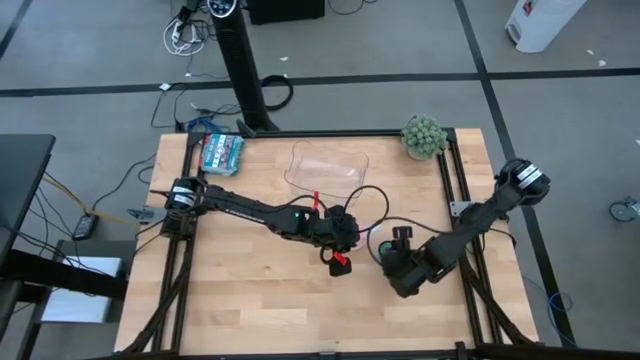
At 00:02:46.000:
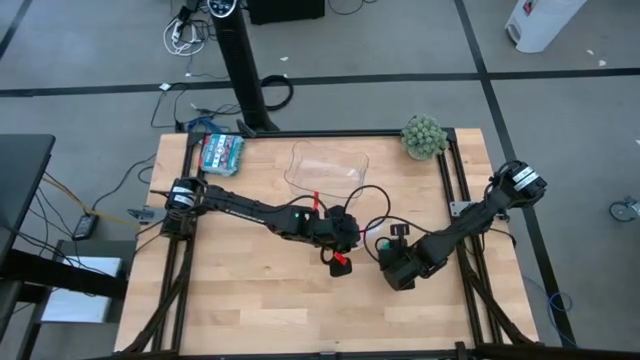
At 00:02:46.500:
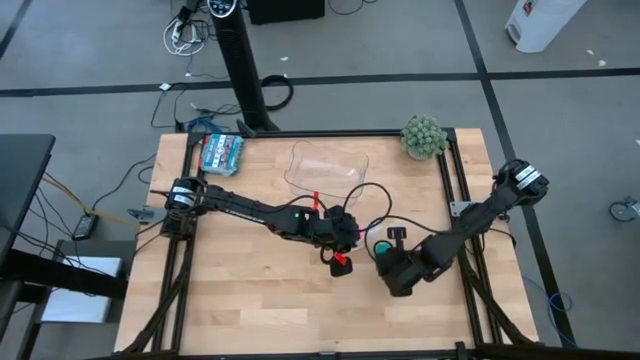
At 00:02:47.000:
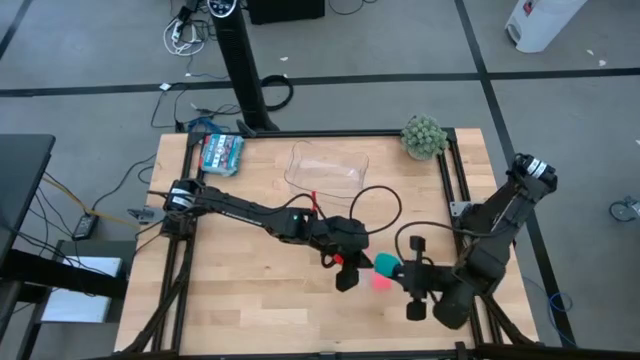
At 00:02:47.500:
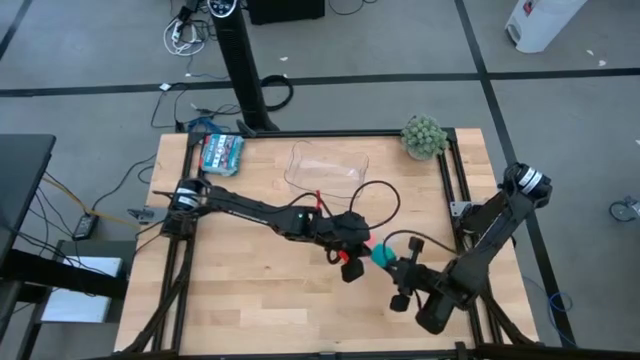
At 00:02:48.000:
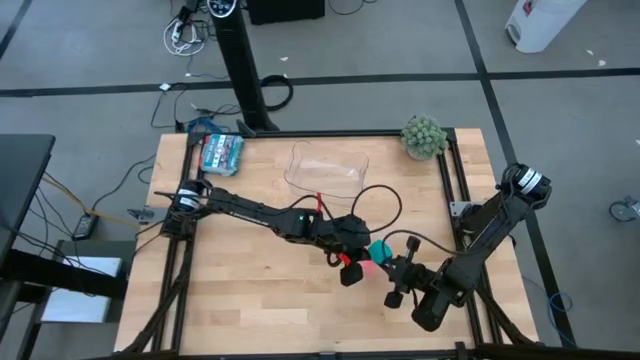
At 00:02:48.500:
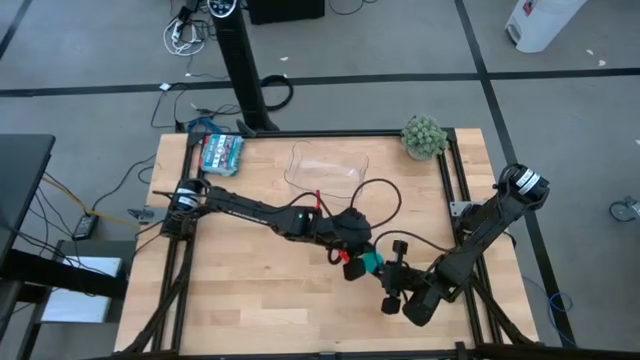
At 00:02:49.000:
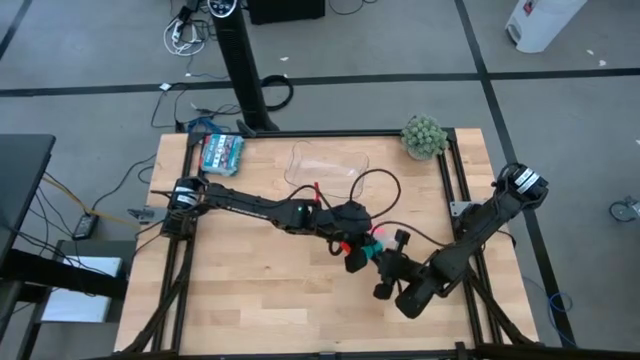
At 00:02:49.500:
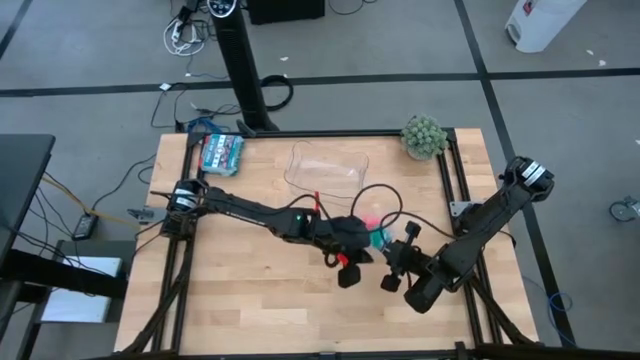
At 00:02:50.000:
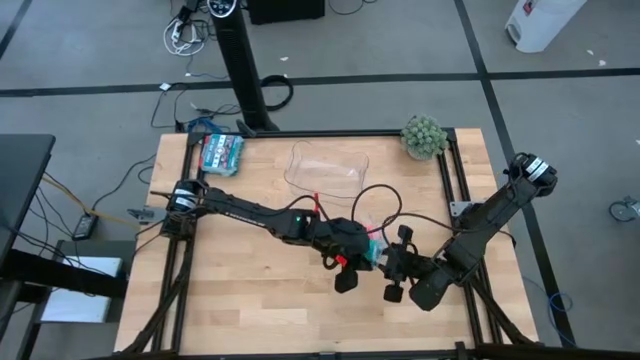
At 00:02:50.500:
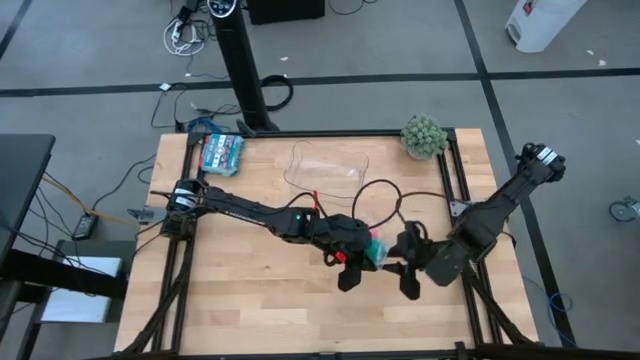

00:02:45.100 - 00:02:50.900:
Task: Roll bandage
Put the blue bandage into the transparent zip bag

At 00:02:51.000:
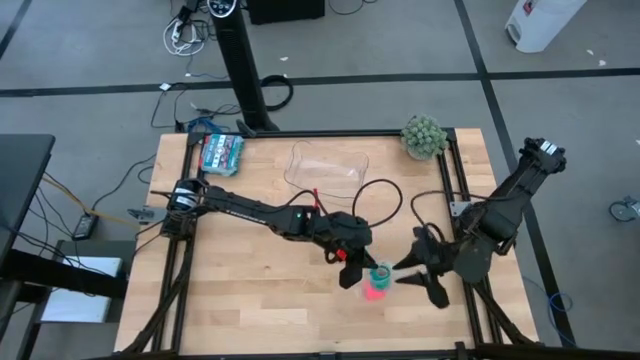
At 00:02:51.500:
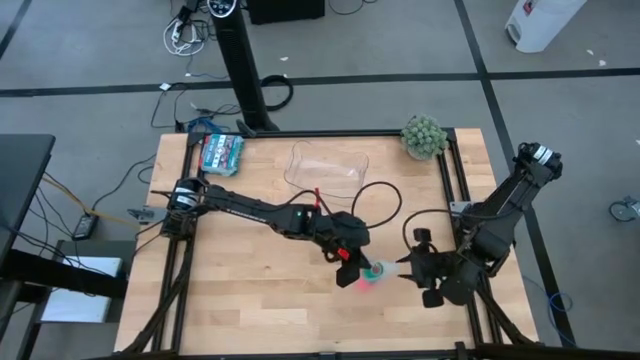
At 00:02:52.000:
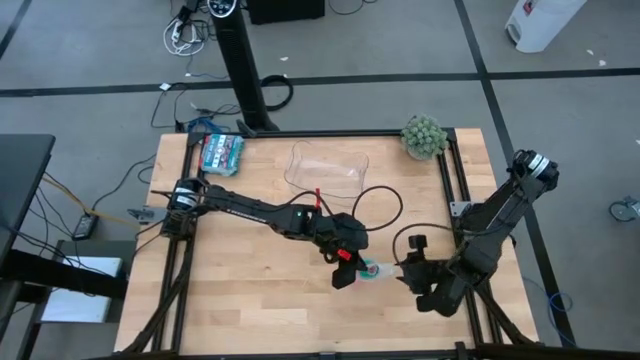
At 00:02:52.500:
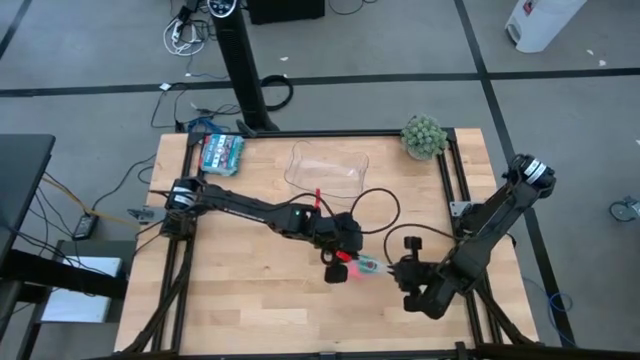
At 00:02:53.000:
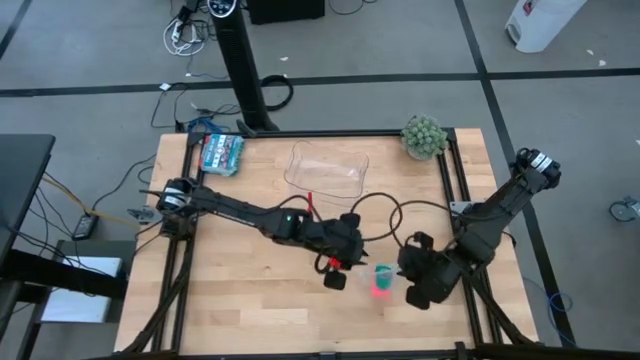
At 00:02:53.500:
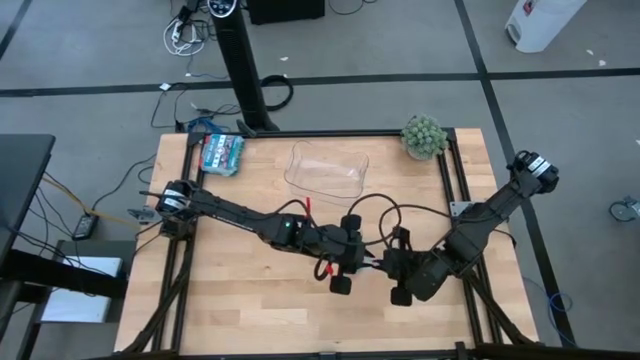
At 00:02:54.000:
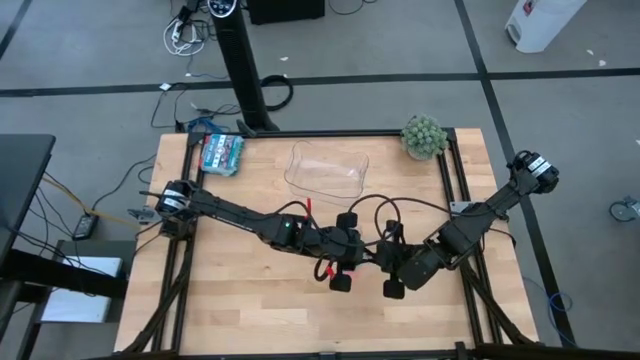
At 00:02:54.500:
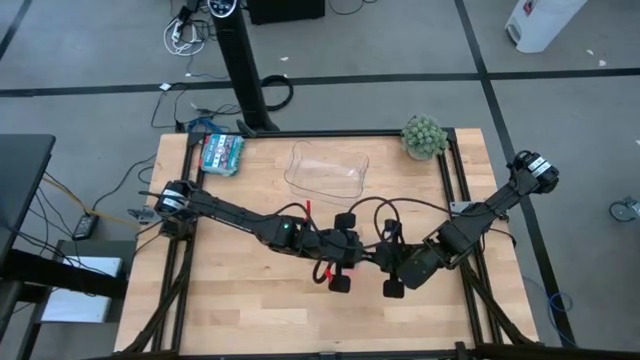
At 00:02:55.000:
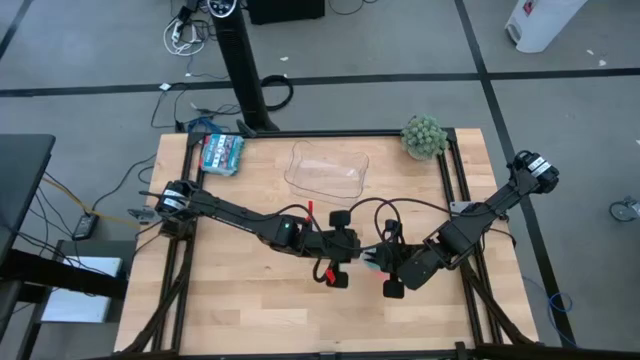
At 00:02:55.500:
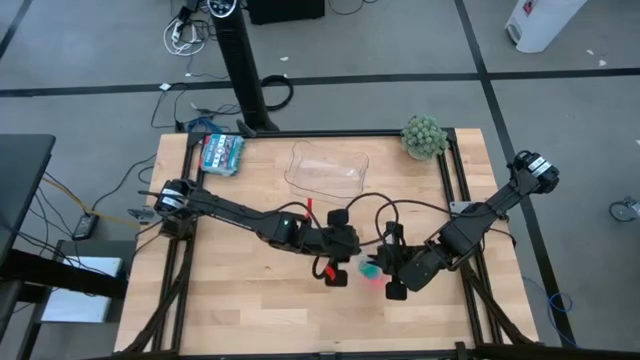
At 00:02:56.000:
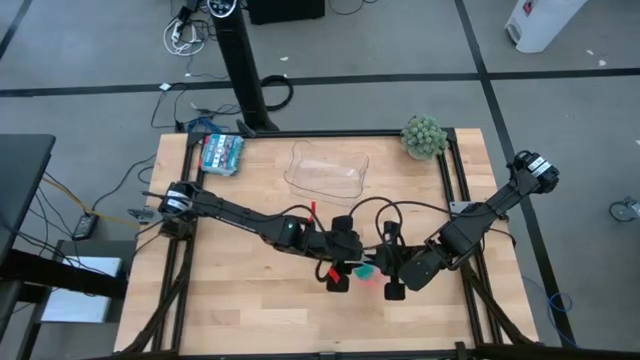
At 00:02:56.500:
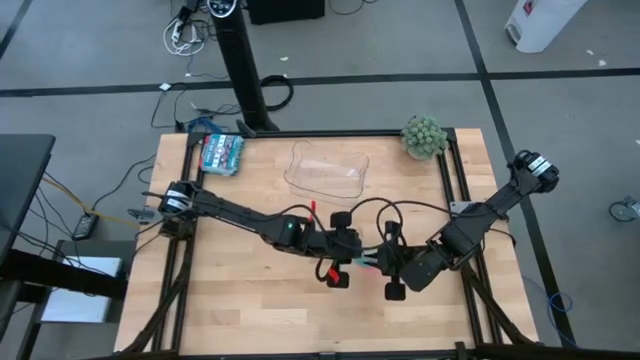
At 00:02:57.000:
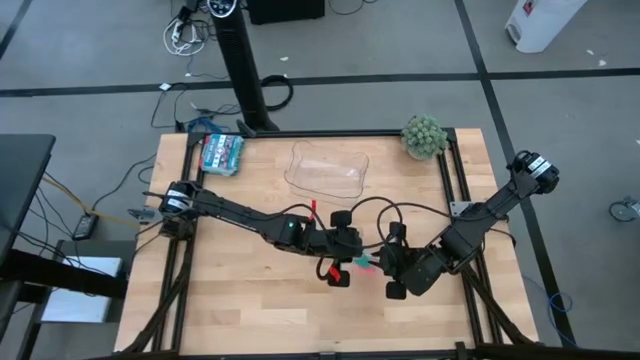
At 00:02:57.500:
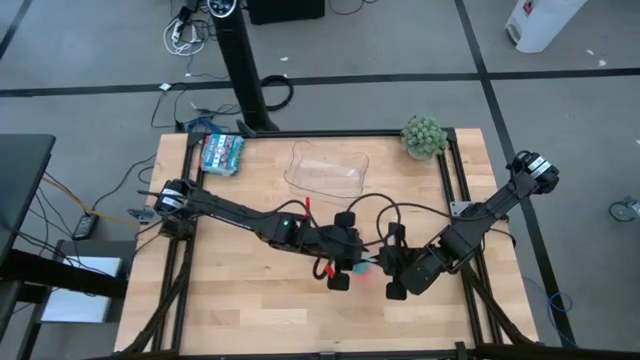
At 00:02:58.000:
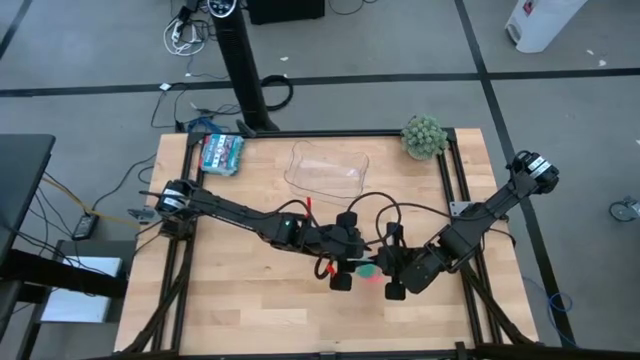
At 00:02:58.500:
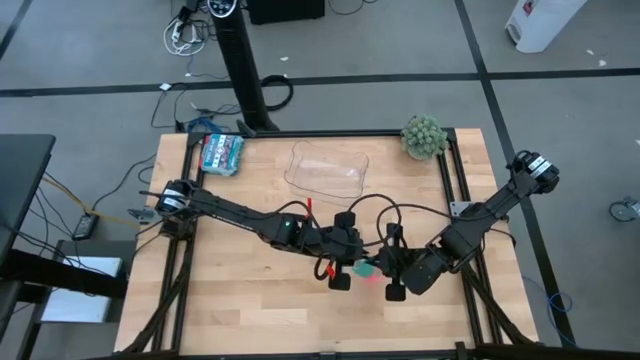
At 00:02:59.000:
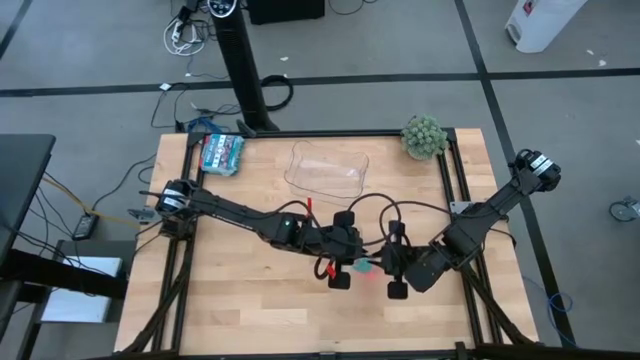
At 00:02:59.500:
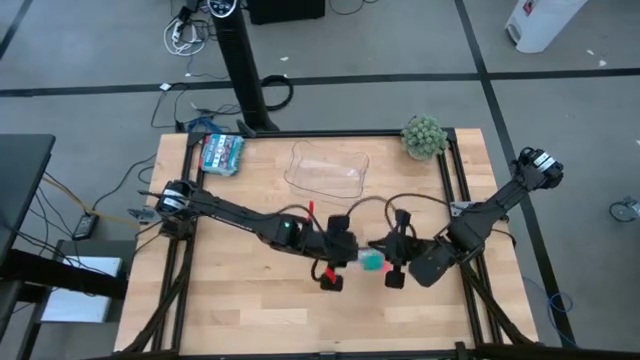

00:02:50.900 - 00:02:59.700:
Close the transparent zip bag

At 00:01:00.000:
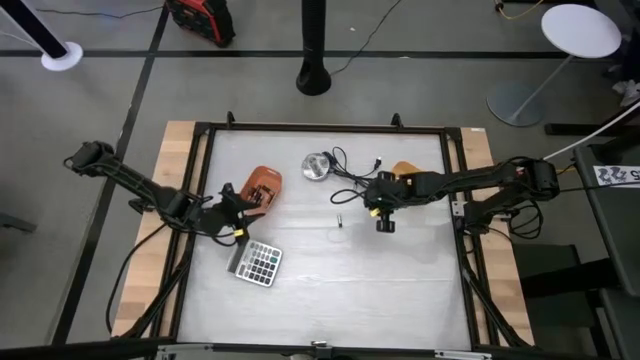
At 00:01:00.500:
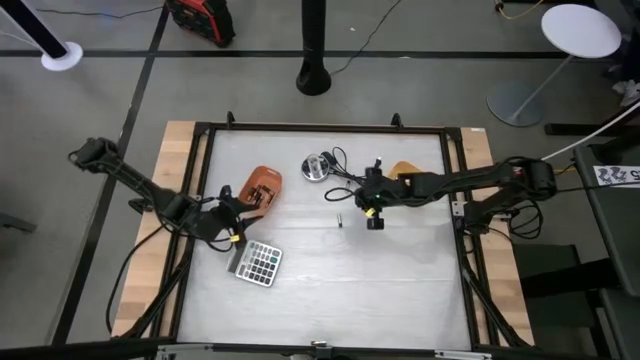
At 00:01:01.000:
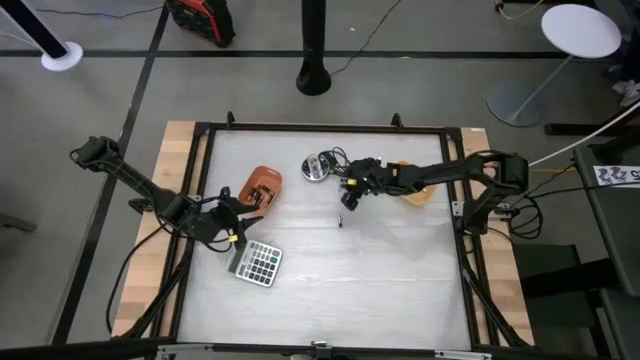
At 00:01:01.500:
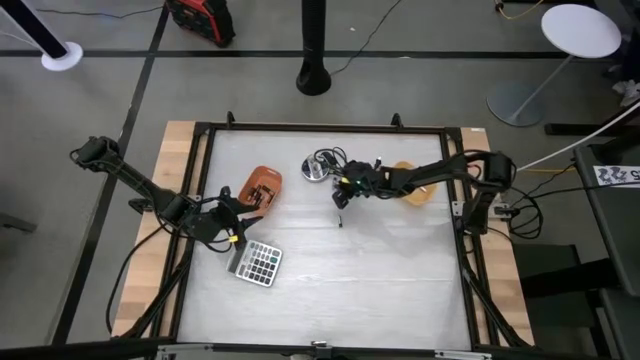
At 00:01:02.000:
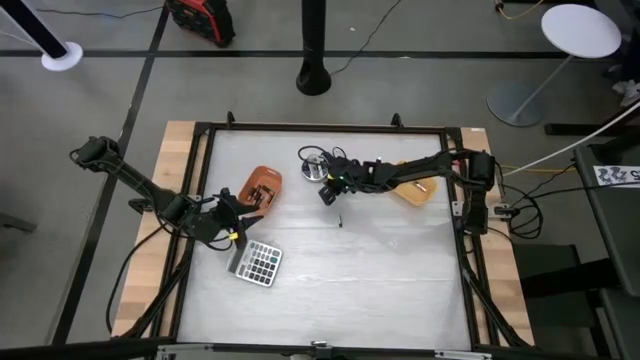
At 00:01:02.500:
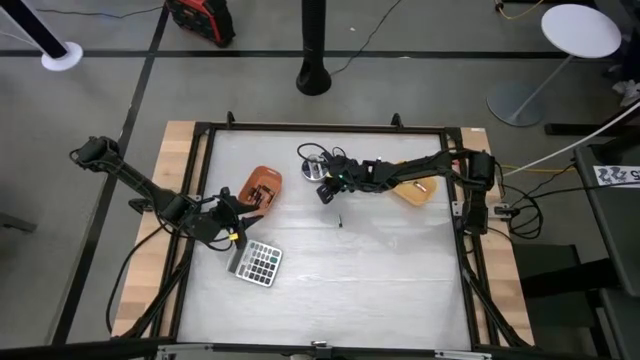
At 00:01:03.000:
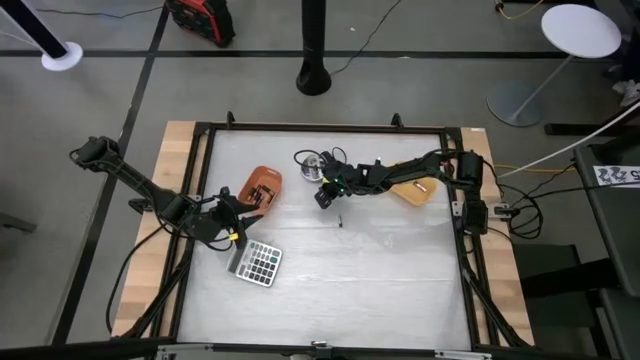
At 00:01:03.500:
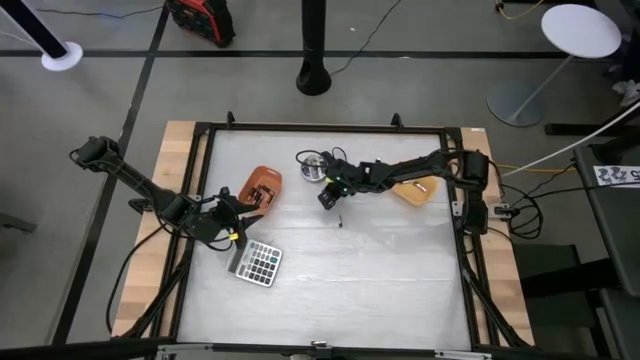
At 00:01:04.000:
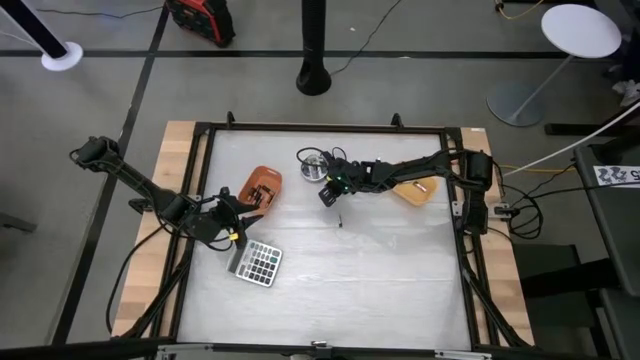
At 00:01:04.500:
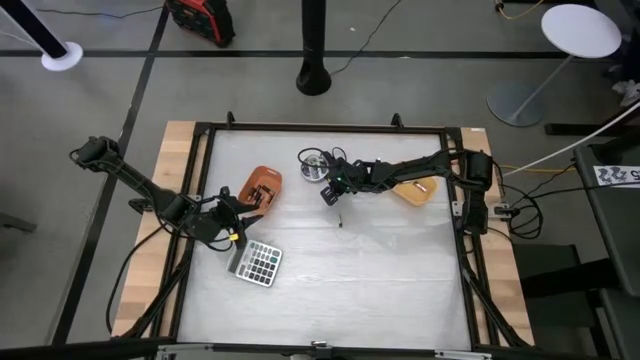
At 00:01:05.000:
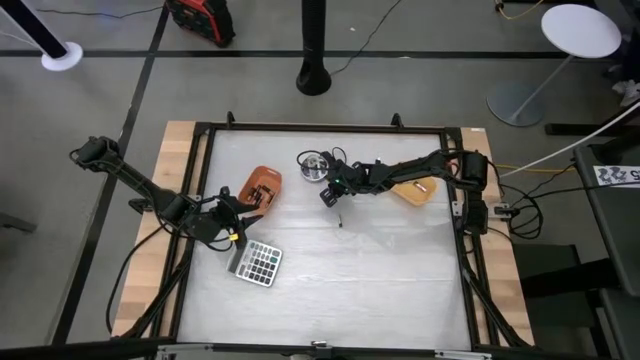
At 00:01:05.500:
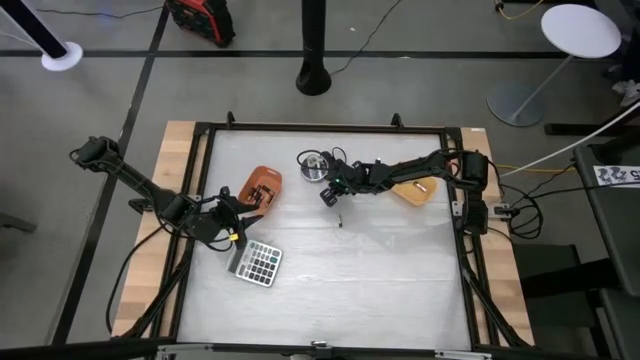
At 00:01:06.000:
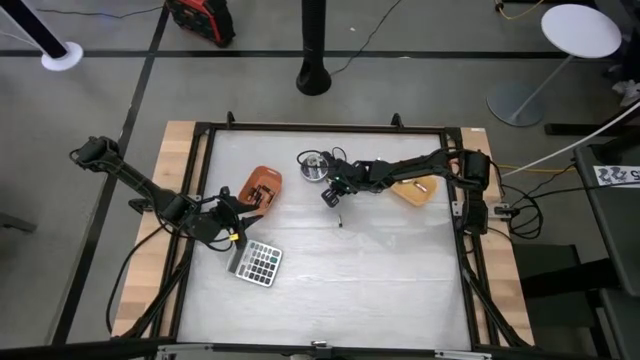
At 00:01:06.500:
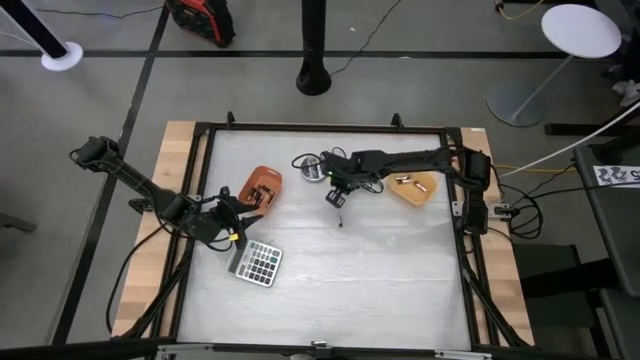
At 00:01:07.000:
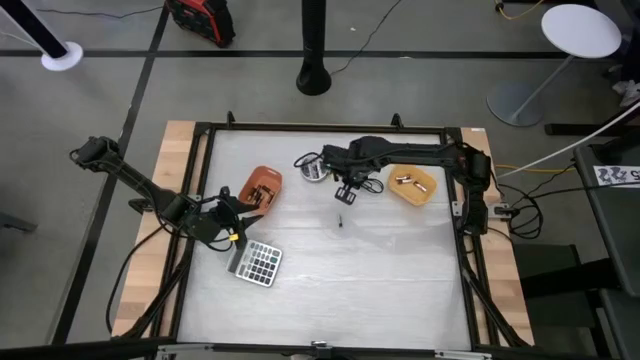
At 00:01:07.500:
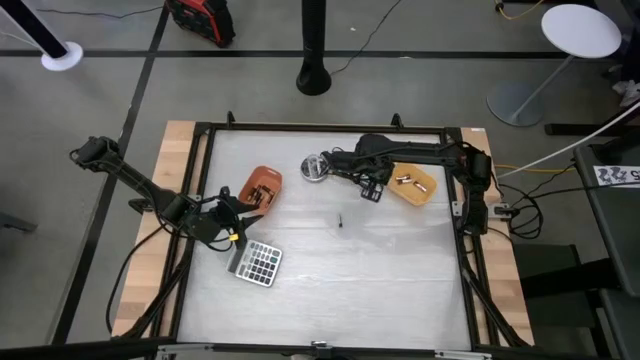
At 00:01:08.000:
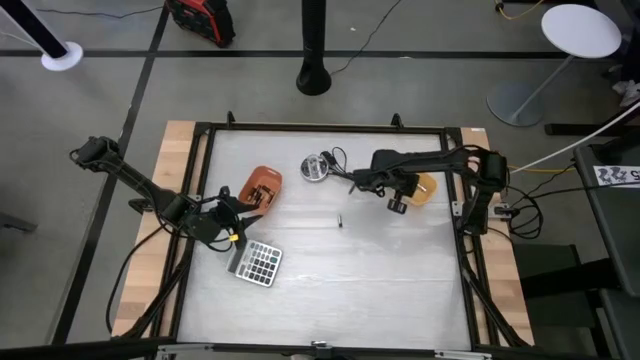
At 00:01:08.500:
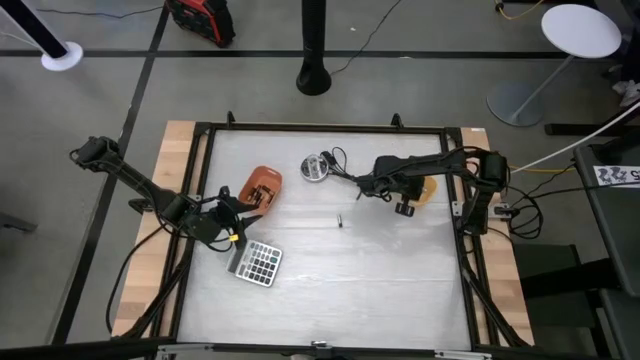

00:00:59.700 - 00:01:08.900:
Task: Sort batteries
Put the silver battery into the yellow bin
